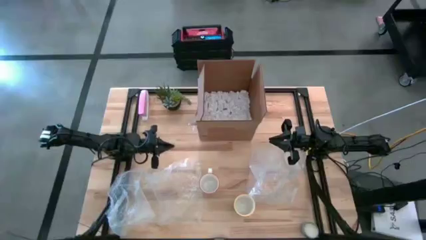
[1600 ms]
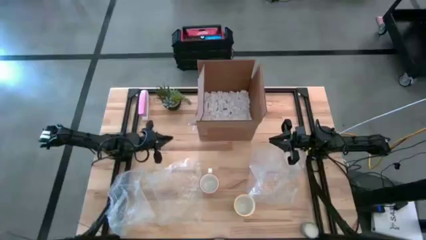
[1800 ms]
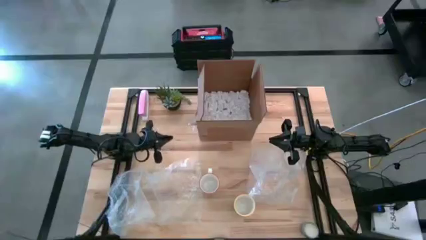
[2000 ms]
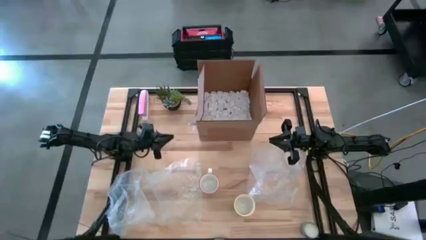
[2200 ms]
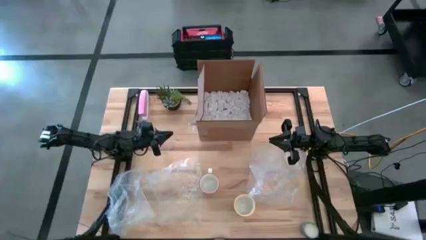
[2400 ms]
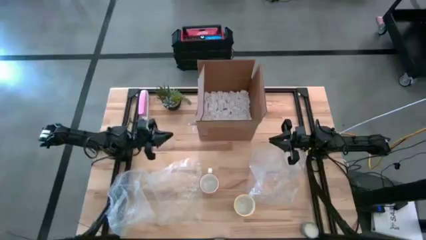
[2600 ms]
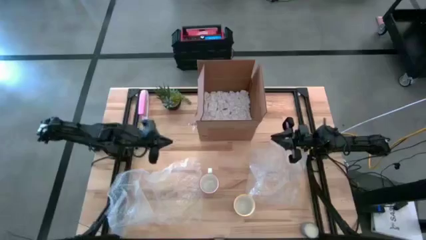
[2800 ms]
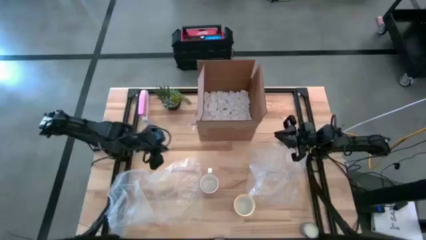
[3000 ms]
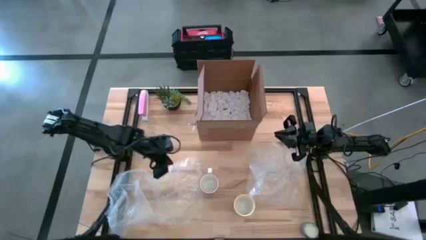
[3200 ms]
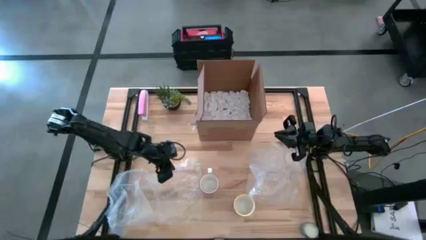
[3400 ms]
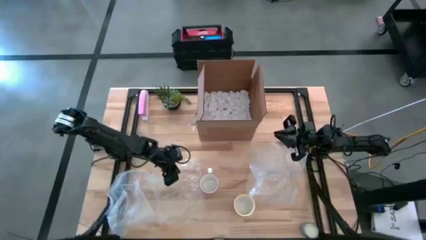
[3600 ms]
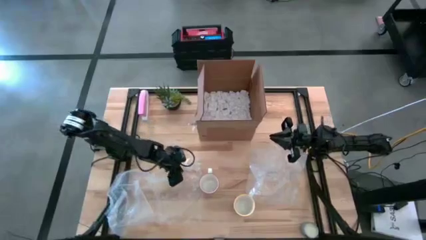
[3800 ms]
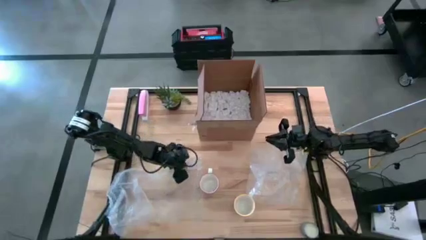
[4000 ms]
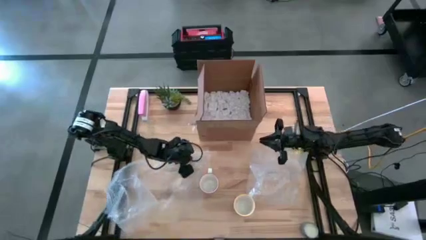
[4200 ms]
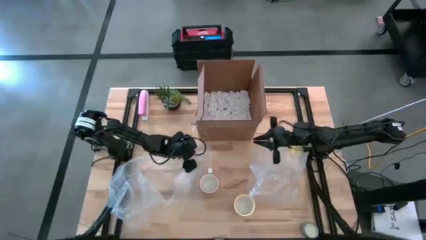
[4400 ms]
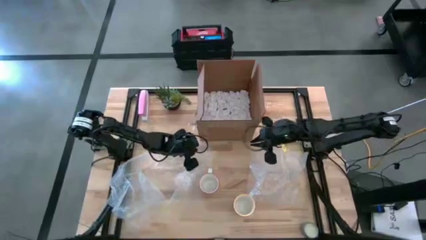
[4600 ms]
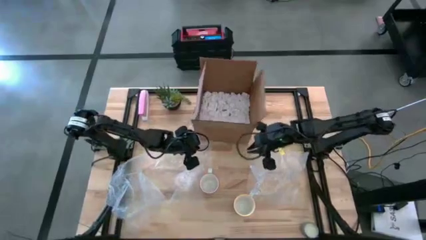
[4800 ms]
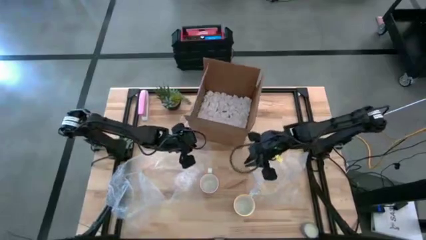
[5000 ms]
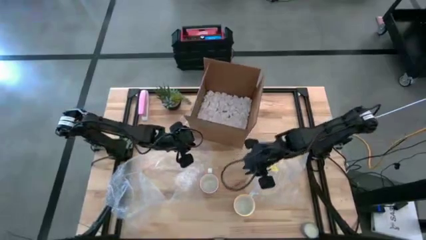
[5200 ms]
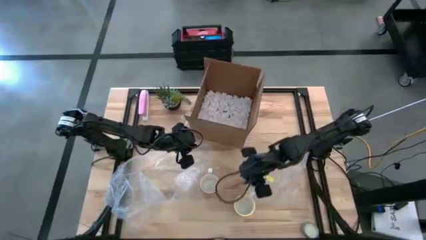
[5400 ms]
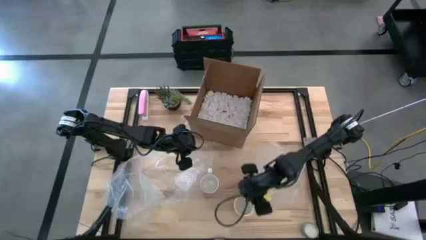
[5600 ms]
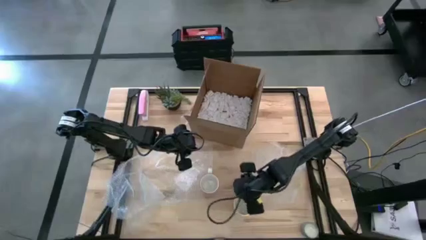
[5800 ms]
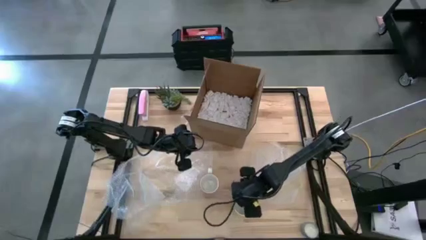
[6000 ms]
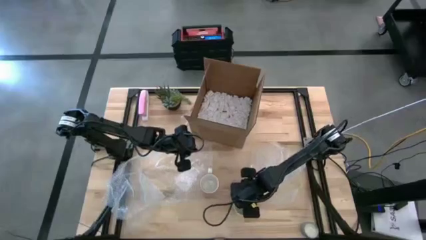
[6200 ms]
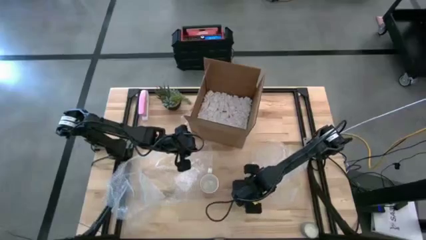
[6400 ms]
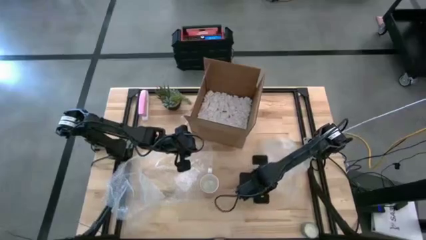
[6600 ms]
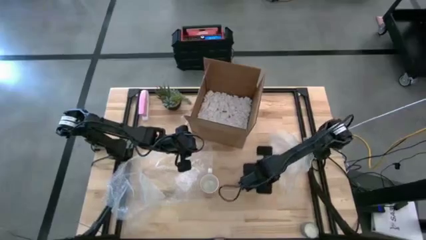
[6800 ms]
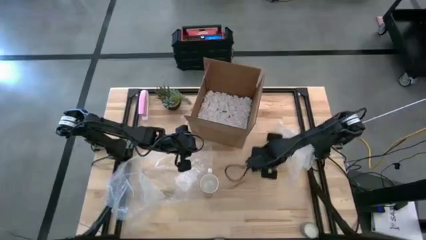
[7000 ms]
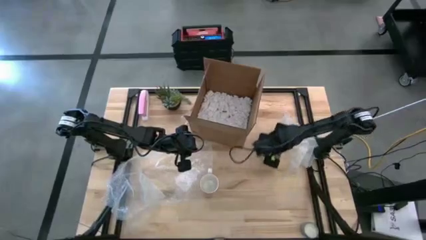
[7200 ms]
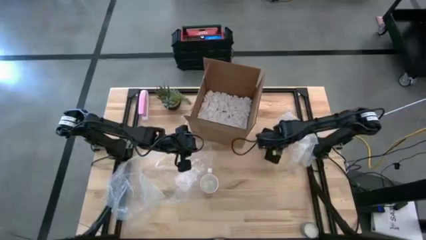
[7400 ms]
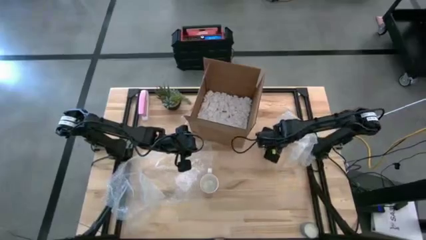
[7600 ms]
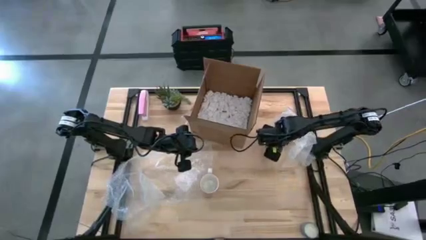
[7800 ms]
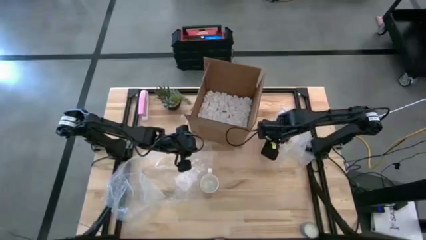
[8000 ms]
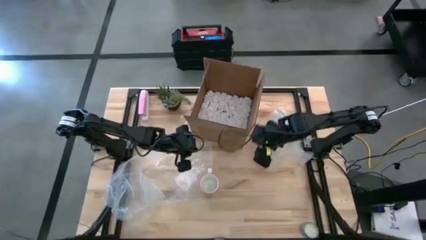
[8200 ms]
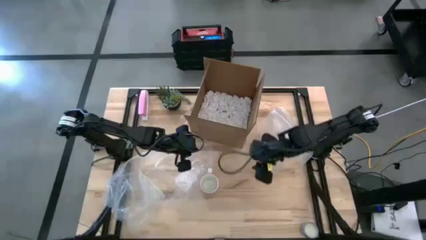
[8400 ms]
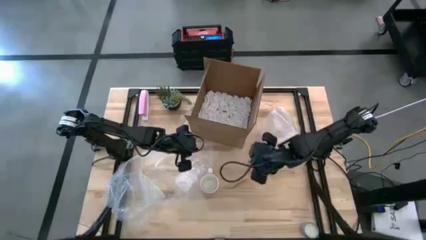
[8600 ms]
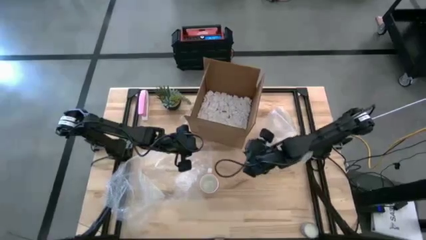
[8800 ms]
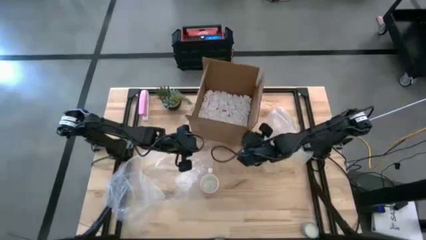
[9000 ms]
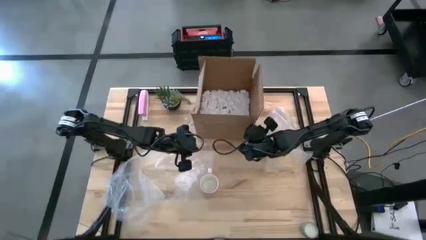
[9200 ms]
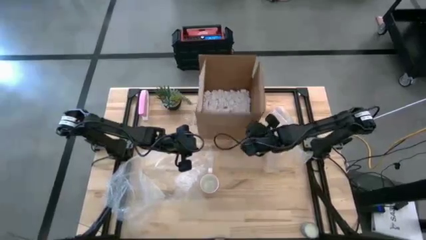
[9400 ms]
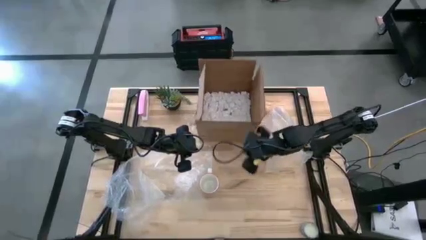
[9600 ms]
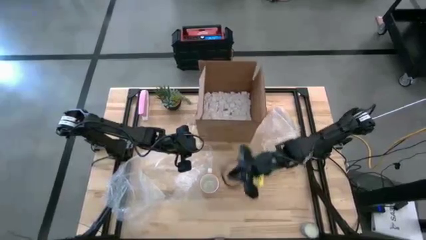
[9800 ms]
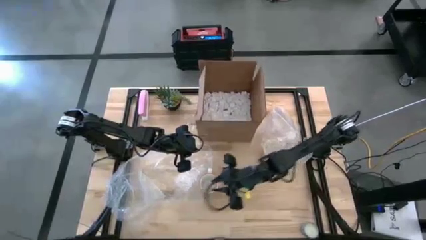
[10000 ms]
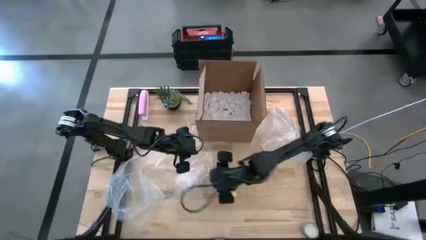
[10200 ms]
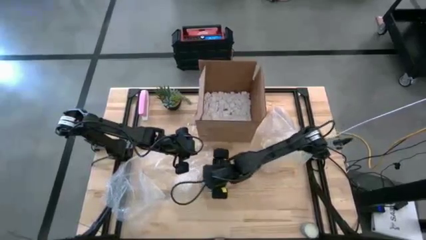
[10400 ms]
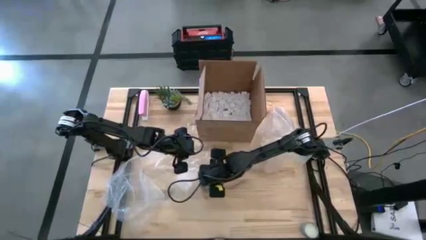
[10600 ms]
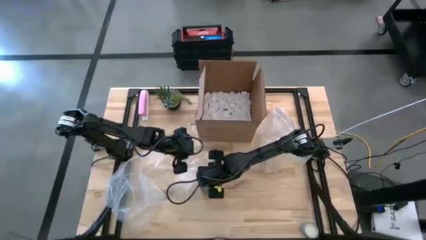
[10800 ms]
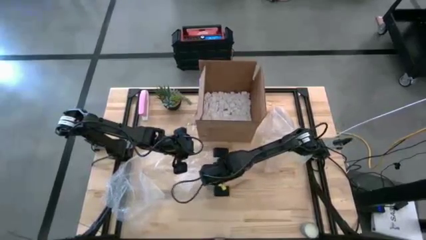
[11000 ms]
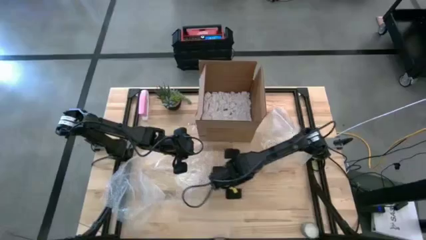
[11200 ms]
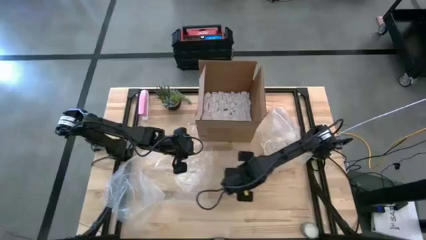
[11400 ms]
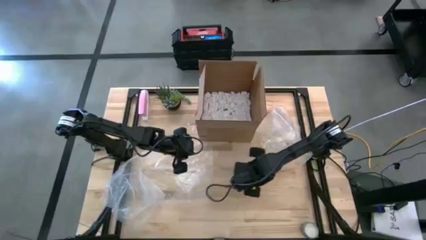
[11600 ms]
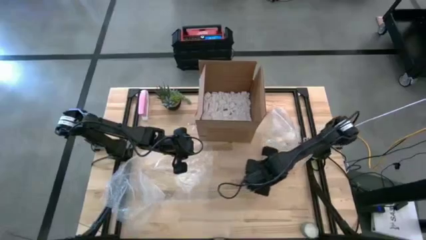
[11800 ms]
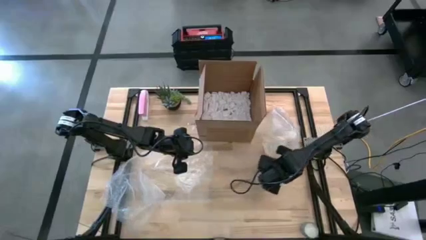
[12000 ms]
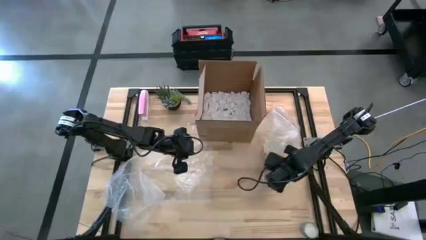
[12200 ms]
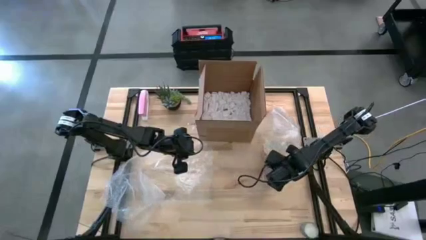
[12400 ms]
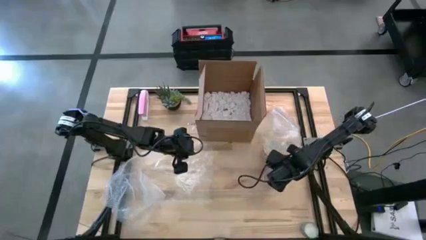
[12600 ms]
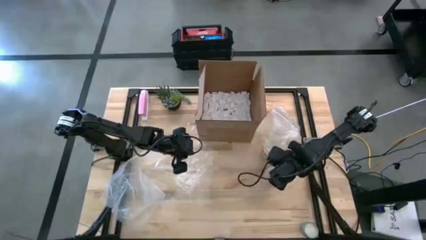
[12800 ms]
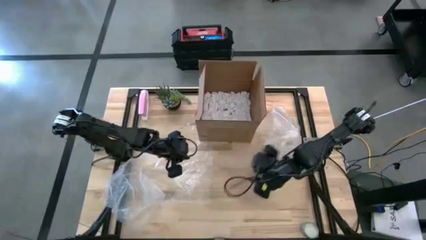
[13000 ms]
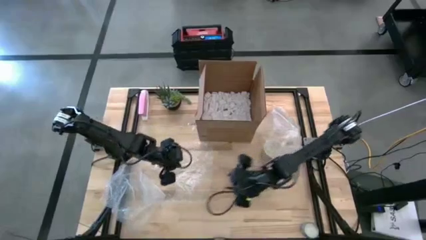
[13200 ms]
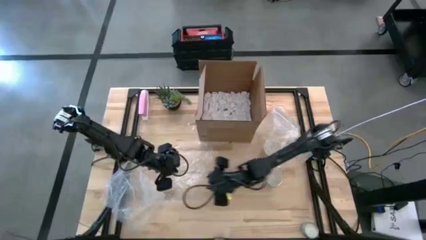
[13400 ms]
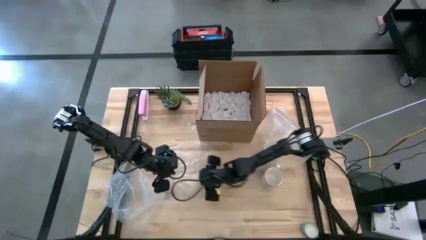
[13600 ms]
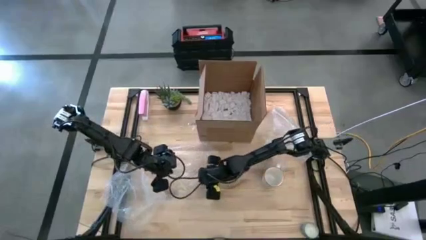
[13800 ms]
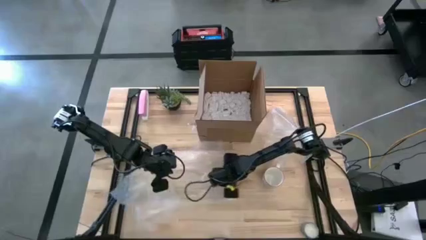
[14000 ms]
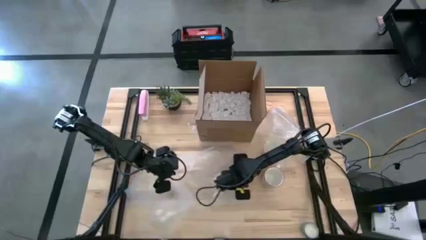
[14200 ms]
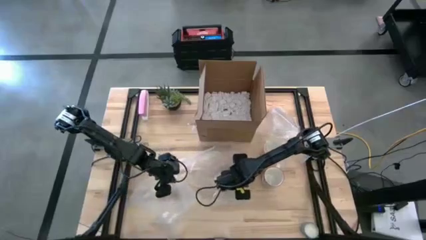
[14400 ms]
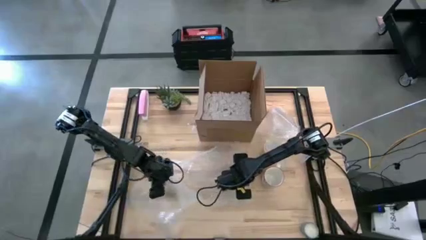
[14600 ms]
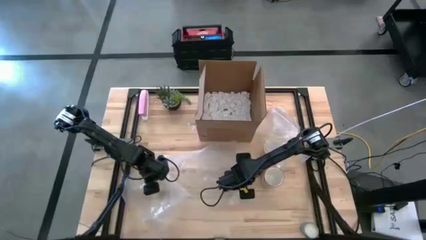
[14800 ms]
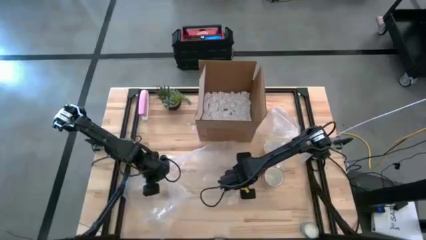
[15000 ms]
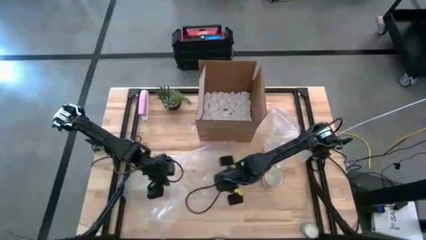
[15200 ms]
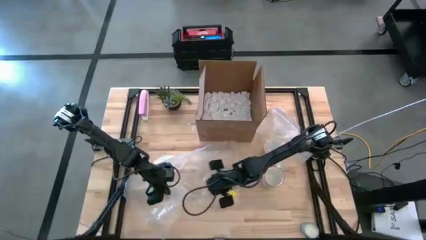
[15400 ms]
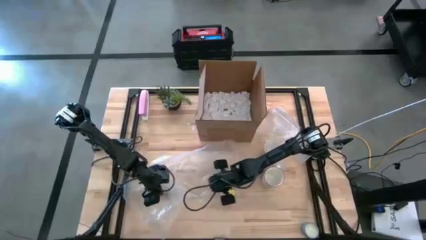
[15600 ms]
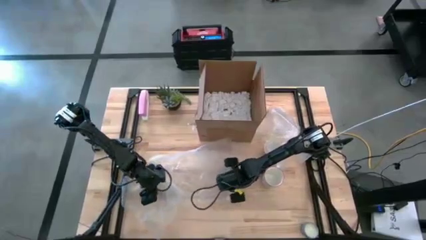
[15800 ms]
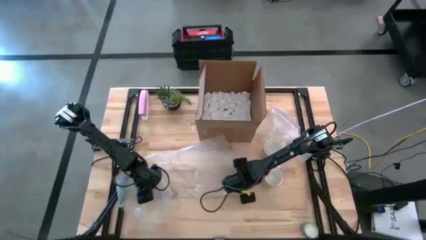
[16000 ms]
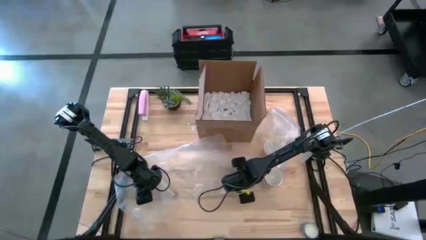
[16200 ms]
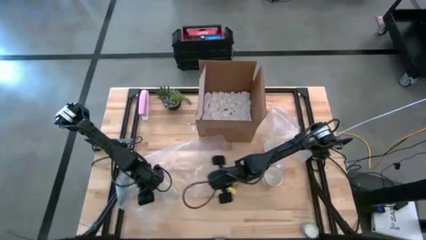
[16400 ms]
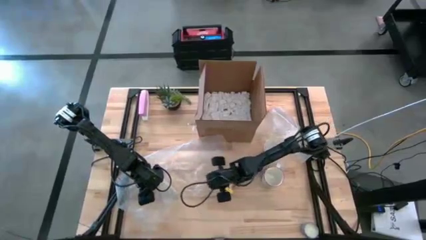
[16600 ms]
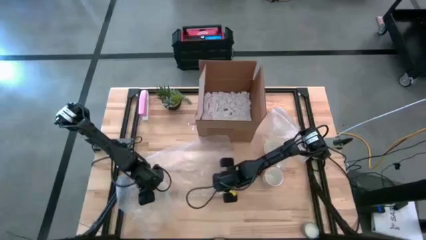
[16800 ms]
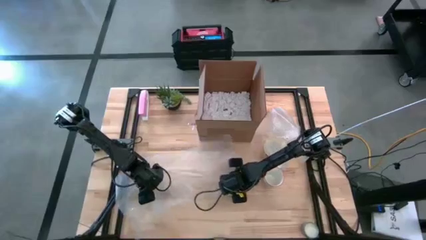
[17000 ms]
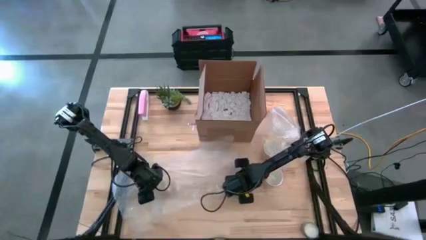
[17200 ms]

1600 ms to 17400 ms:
Task: wrap mug
Prepare the bubble wrap
